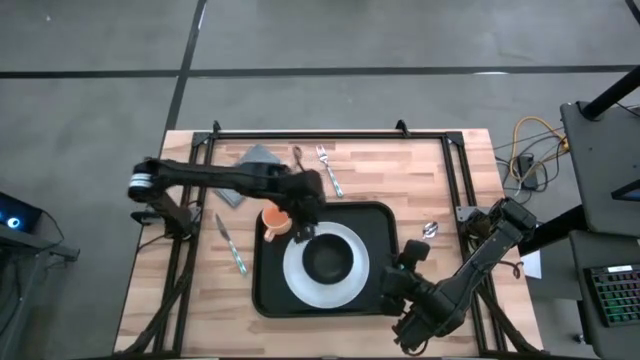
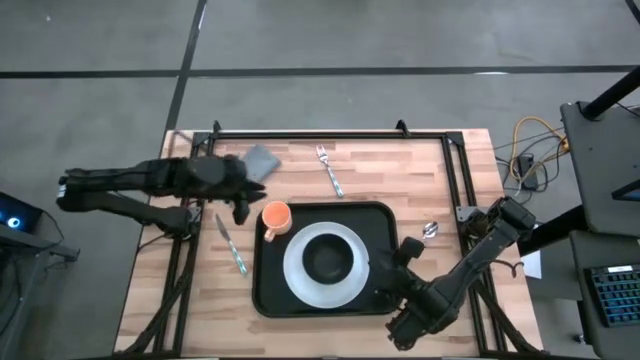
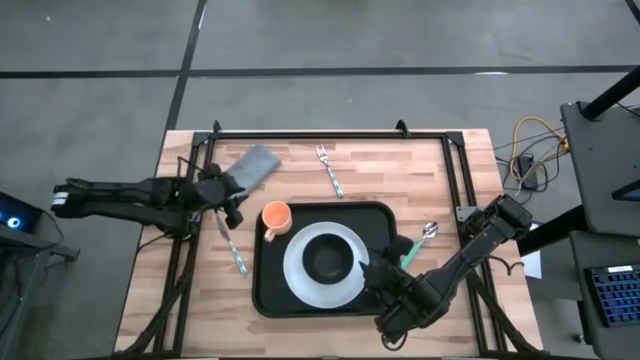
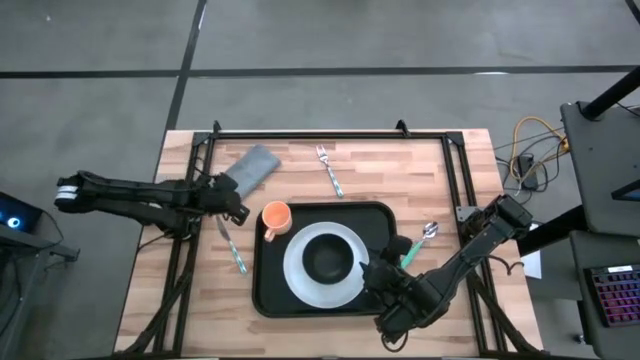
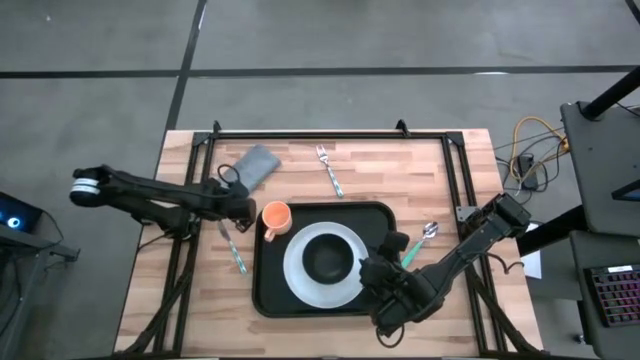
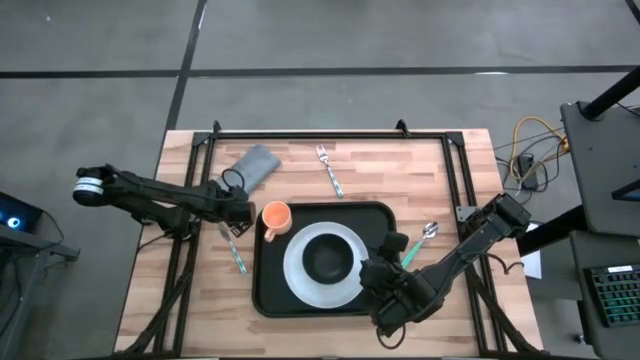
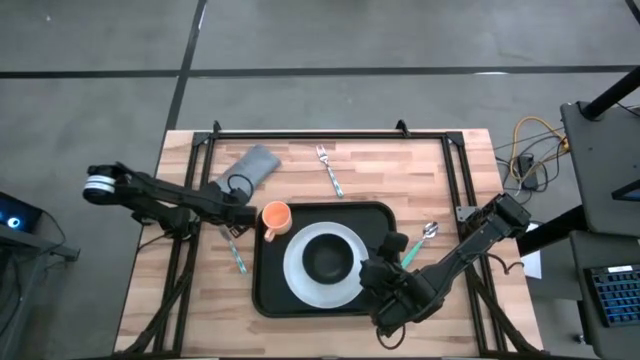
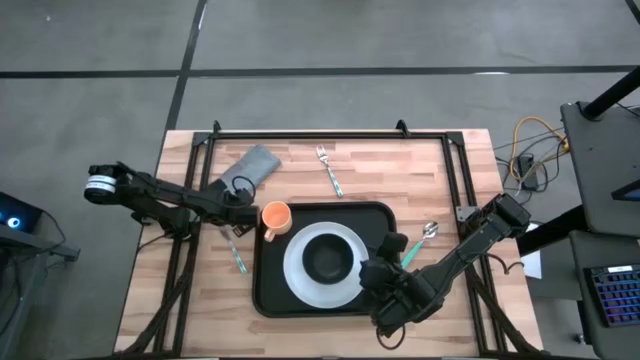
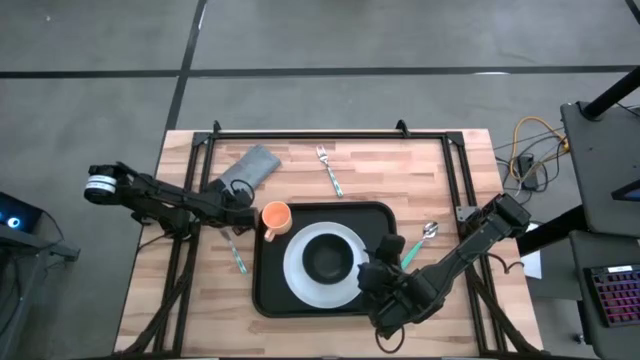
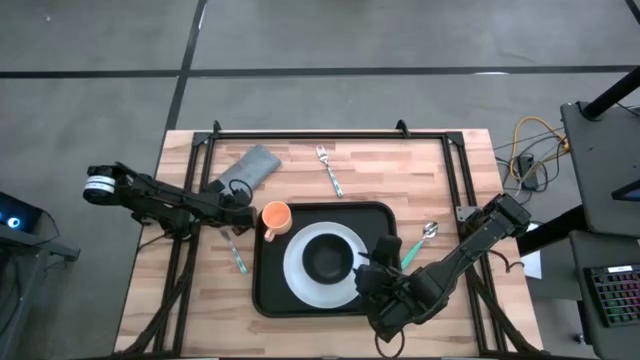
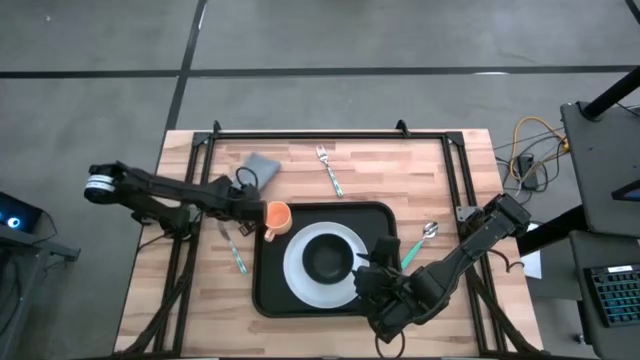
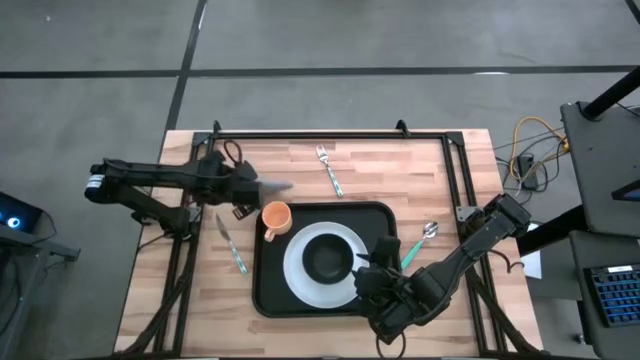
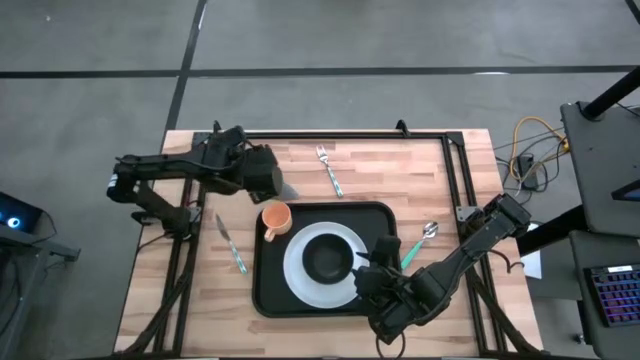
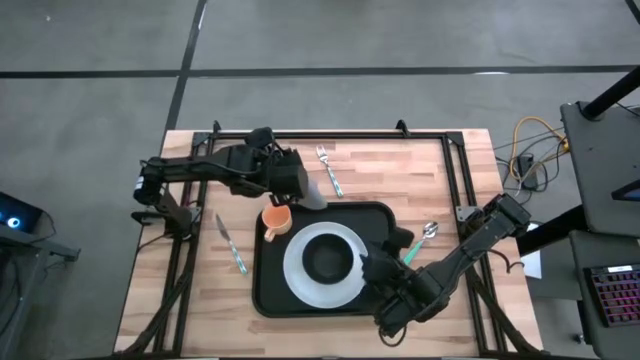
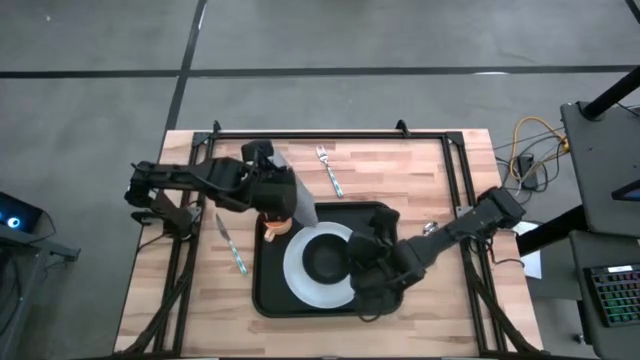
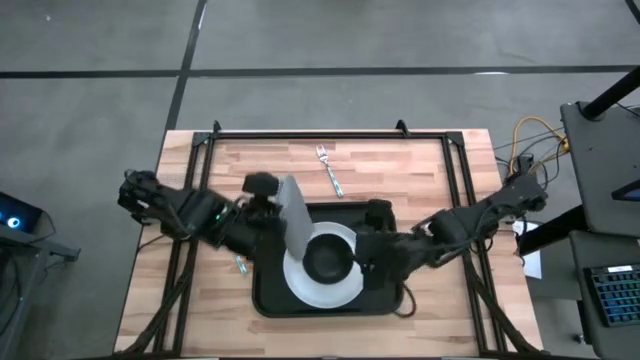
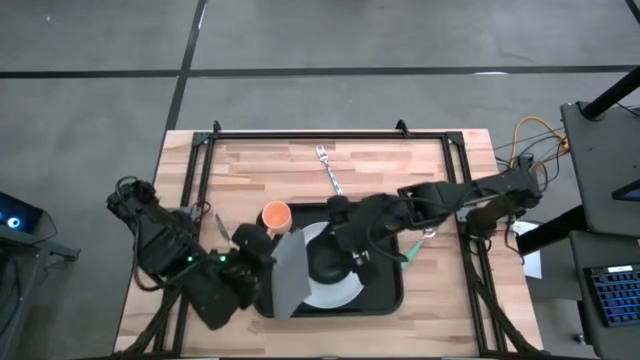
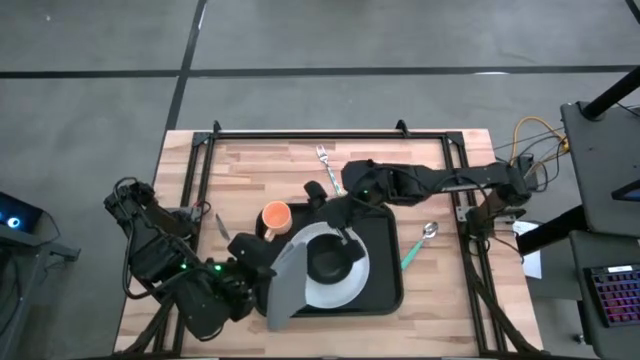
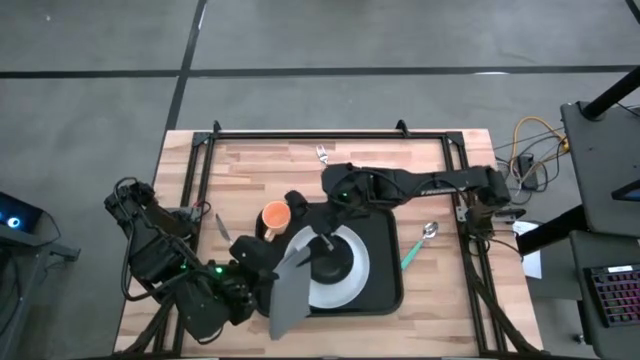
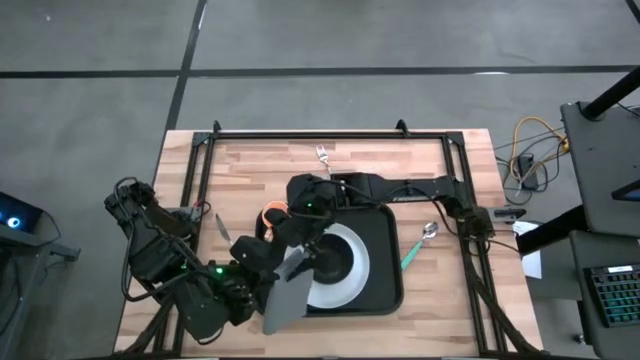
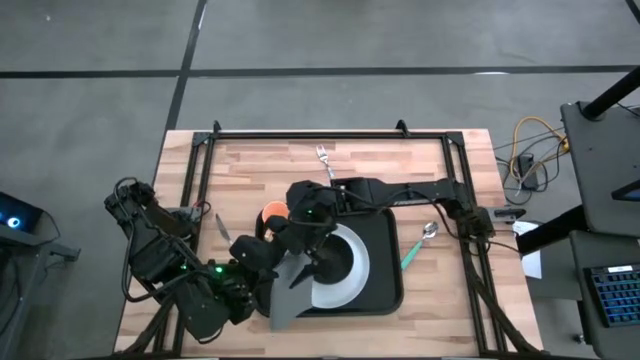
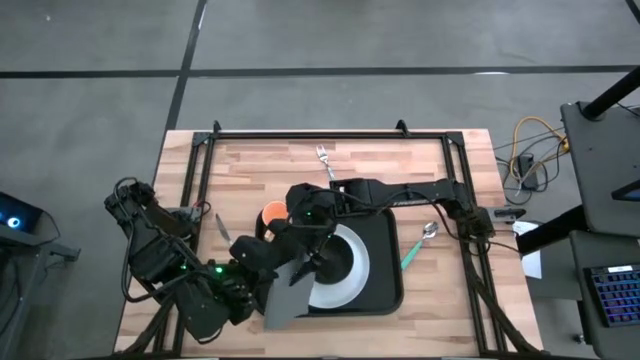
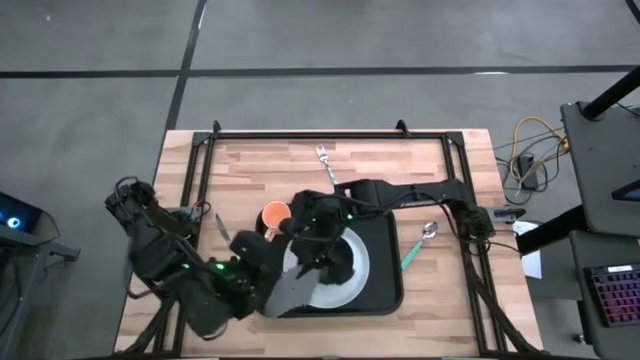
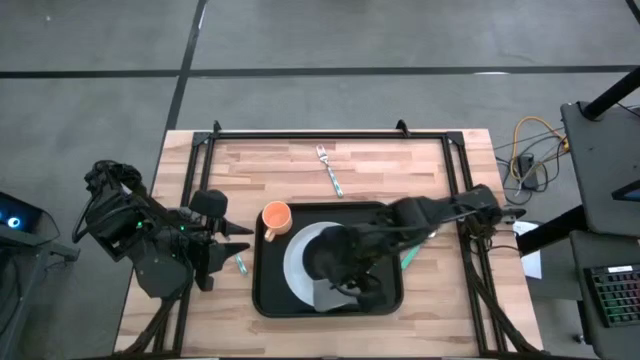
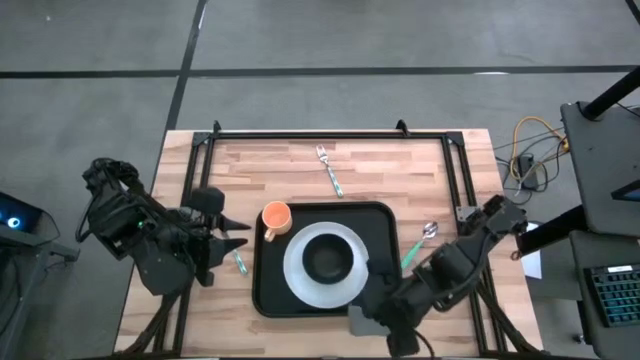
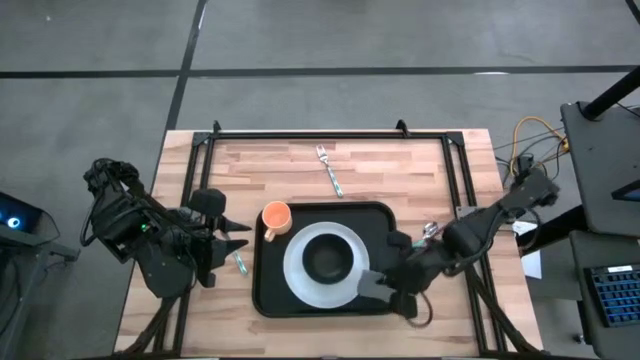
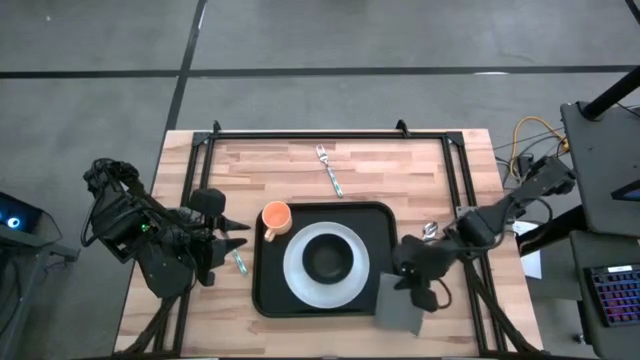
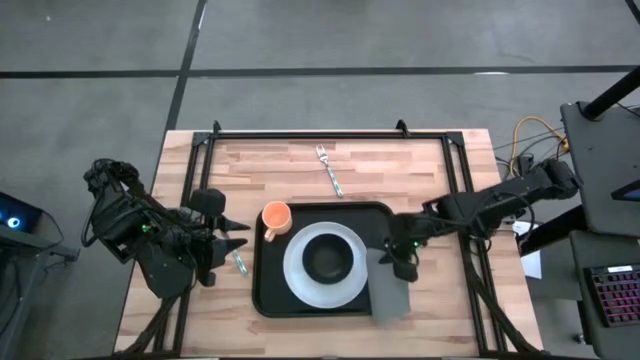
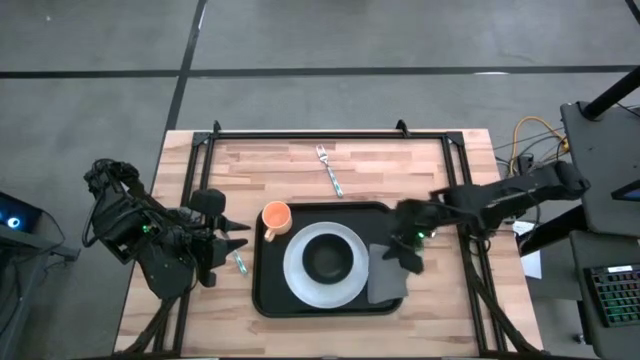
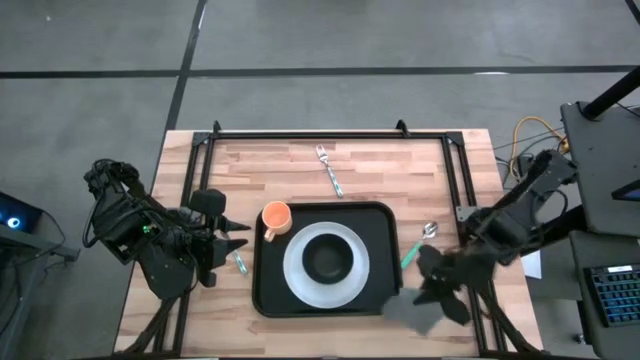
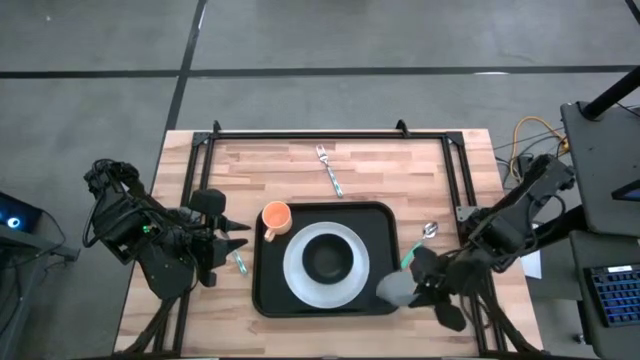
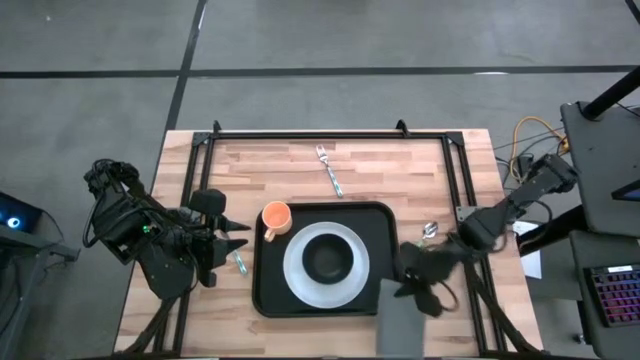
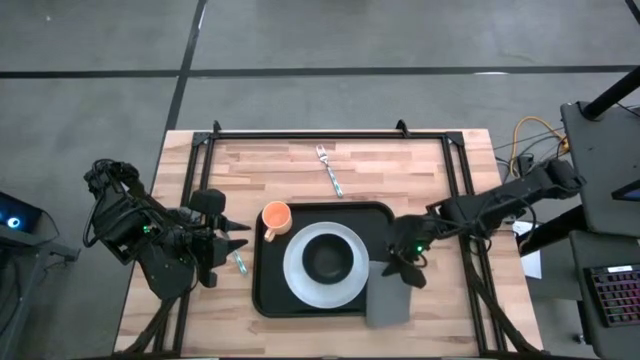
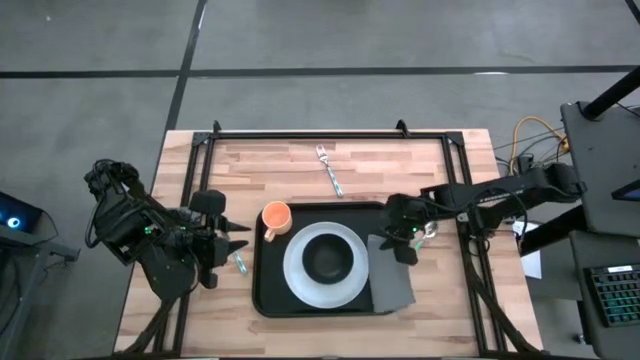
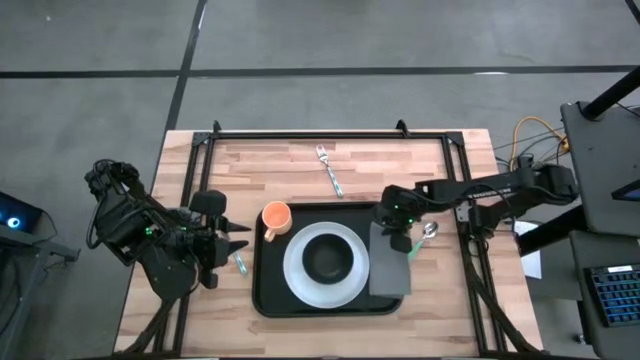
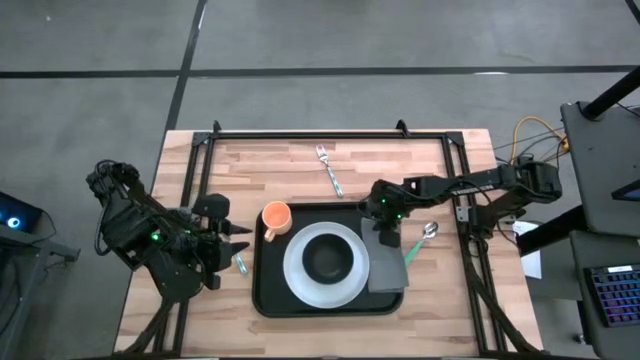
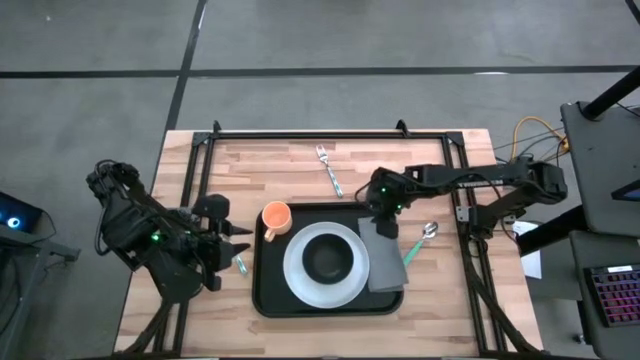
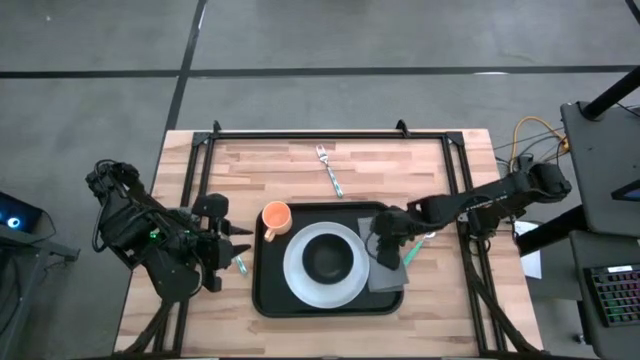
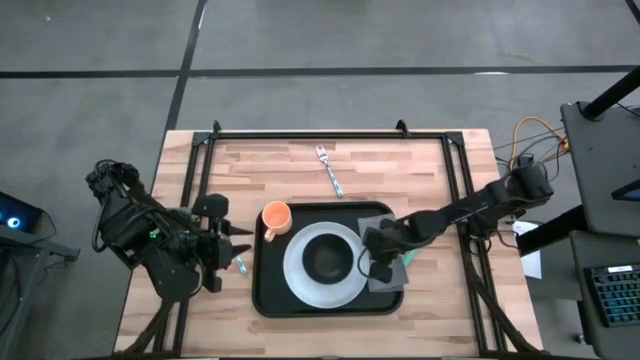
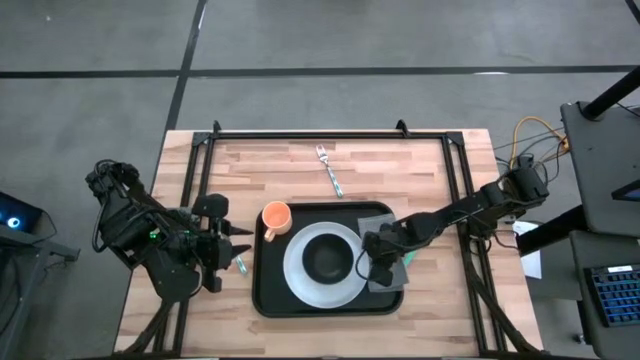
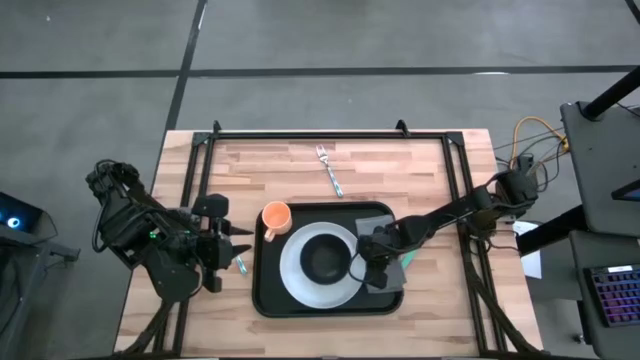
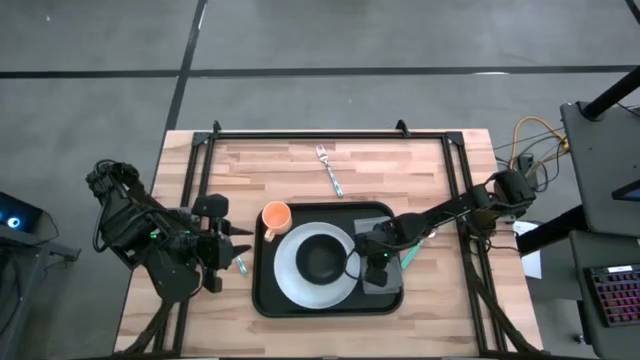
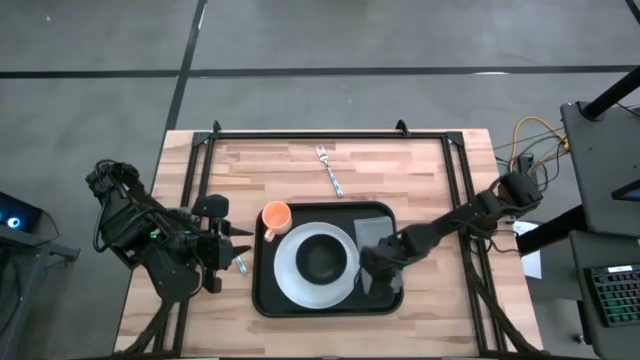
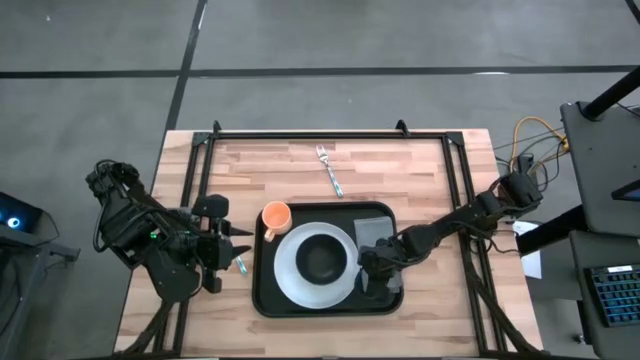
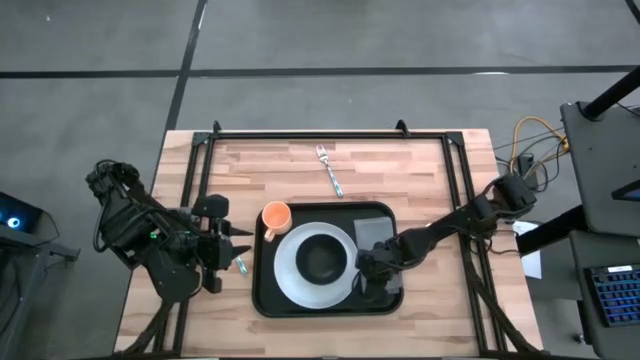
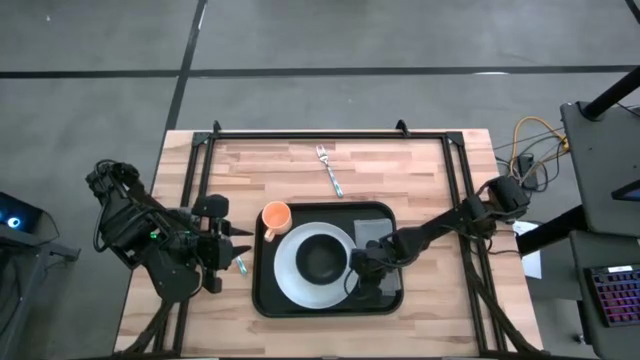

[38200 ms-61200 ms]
Task: Set up tray
Put the gray napkin to the right of the white plate on the black tray
